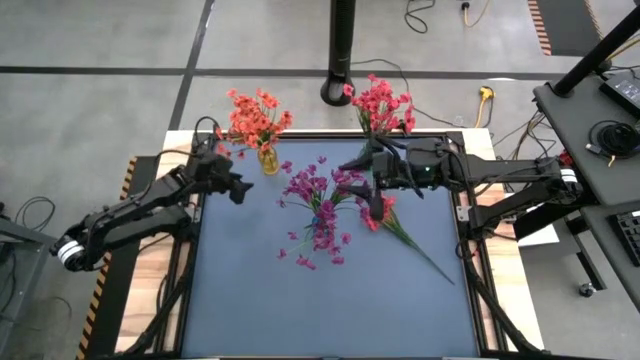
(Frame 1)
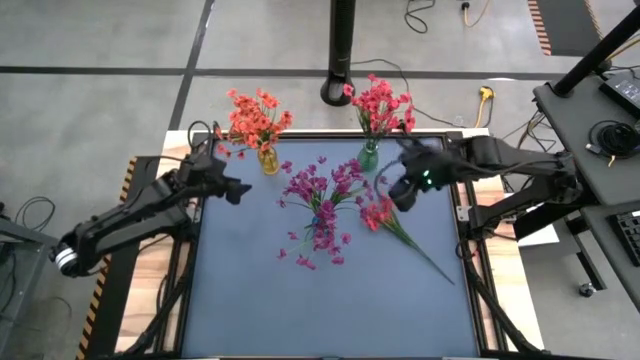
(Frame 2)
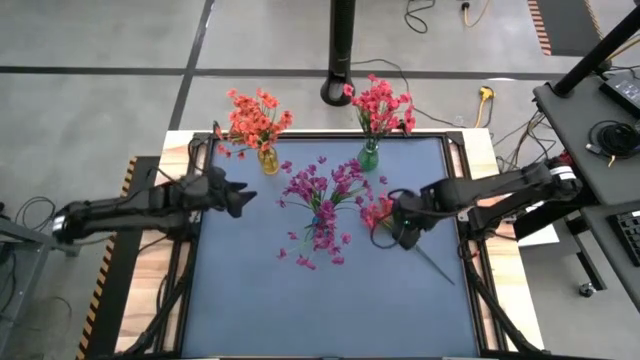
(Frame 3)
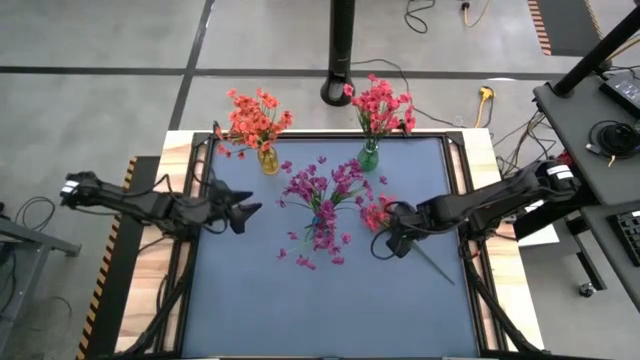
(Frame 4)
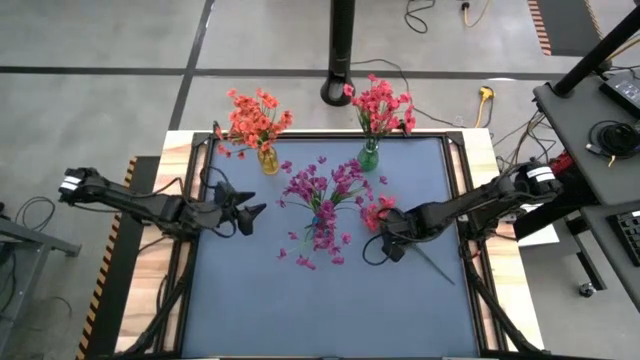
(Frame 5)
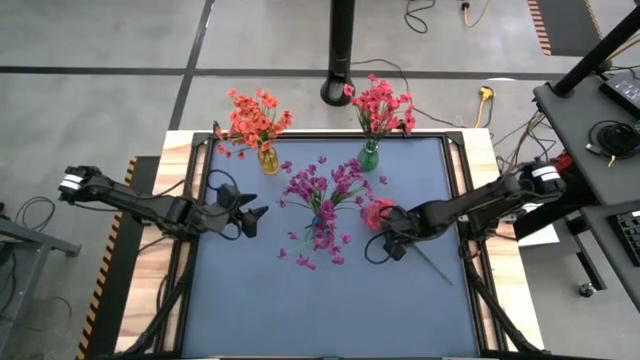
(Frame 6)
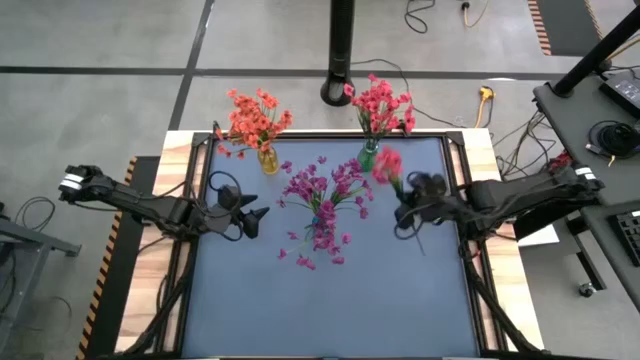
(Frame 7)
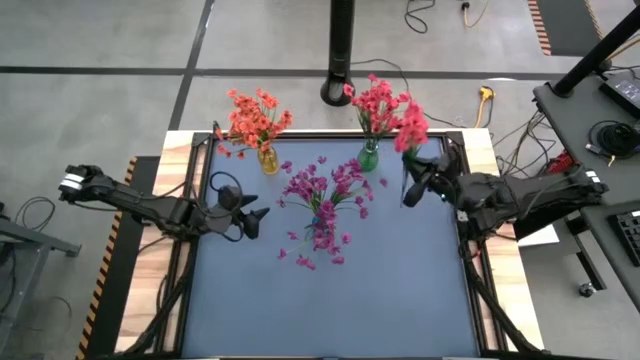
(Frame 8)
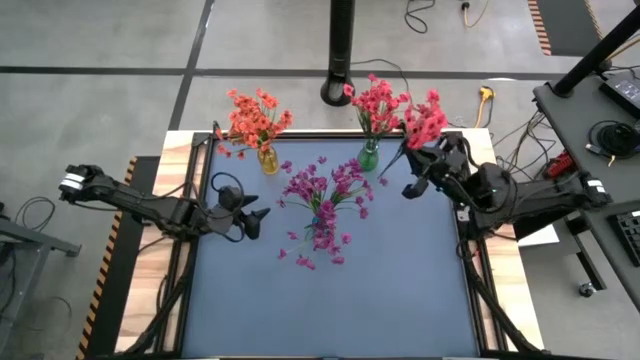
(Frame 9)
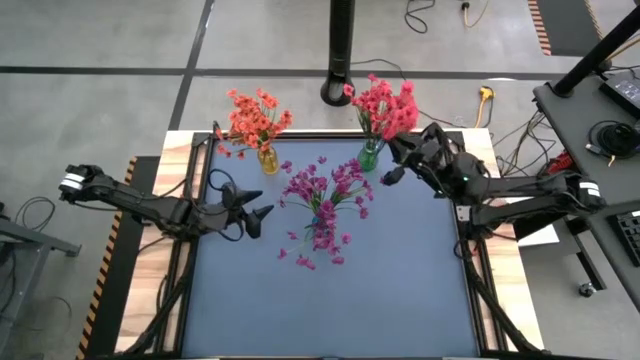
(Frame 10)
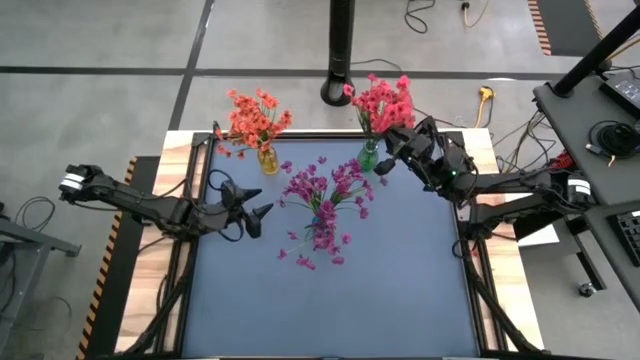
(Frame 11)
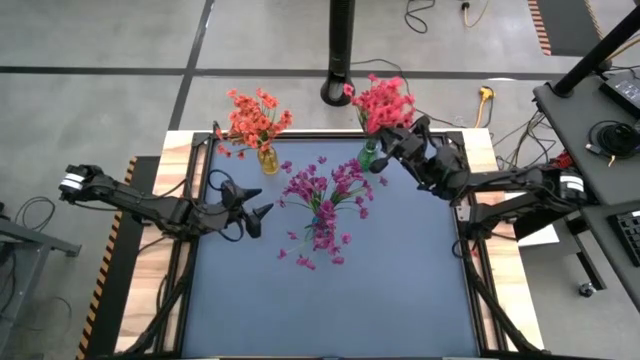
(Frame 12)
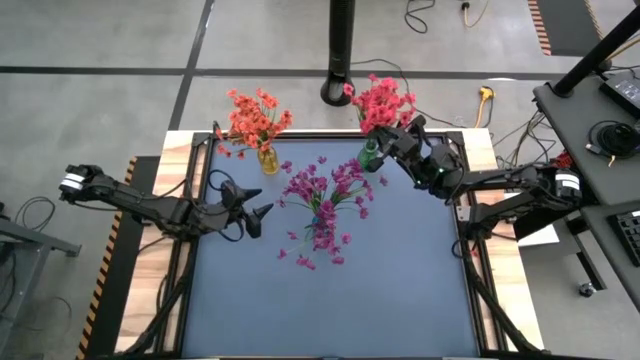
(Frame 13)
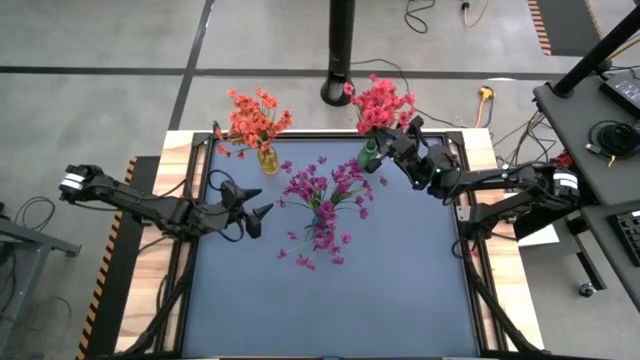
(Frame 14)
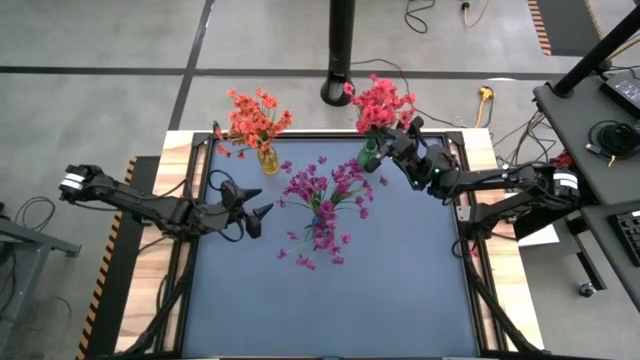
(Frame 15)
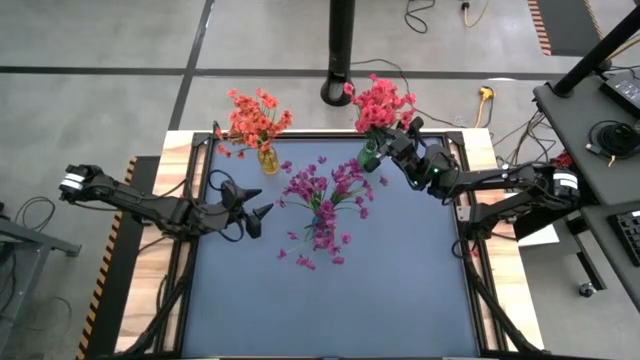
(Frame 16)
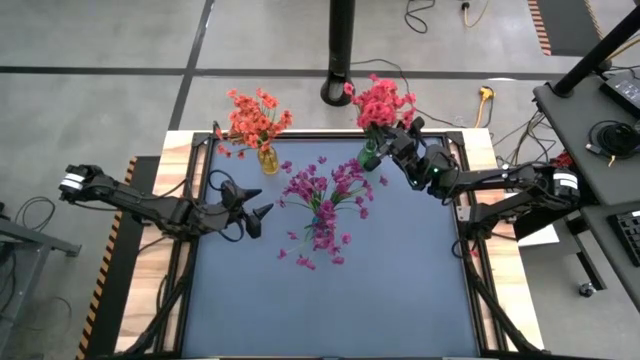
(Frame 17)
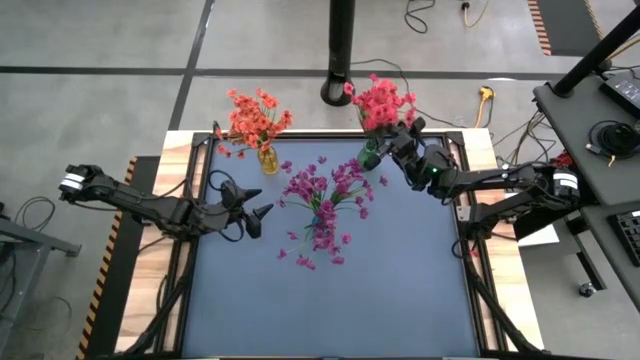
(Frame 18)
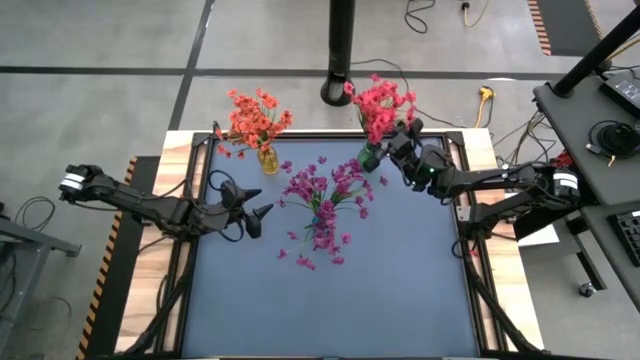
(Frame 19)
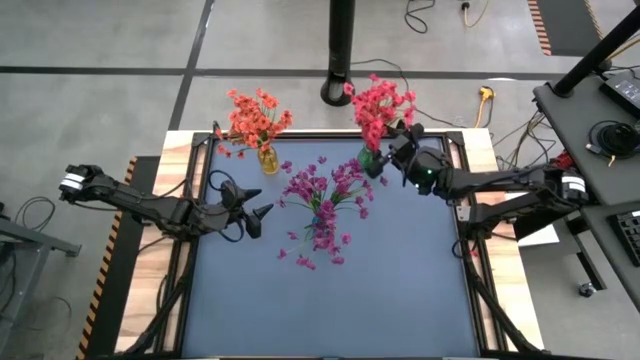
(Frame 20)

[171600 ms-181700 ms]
Task: Sort flowers into vase by color
Put the red flower into the green vase

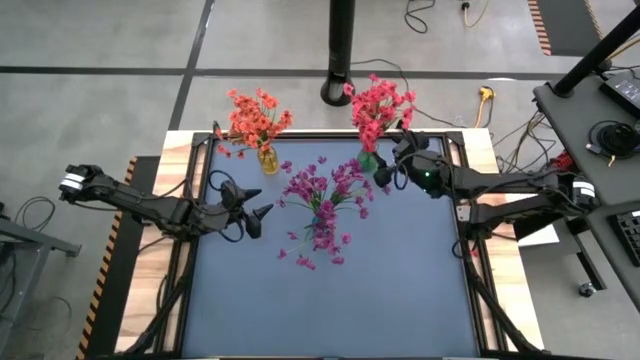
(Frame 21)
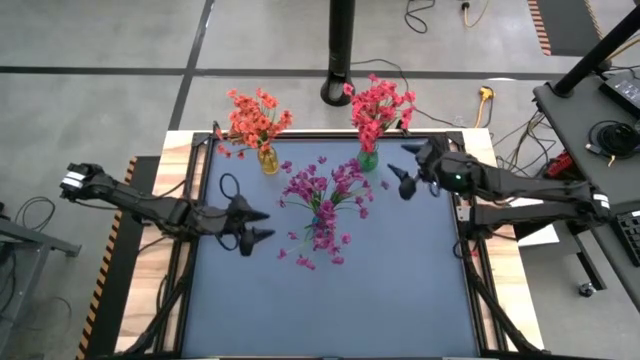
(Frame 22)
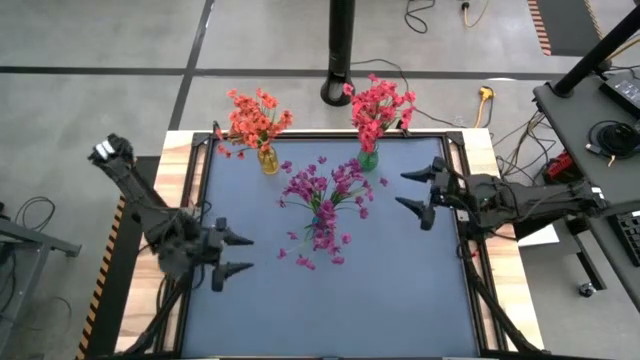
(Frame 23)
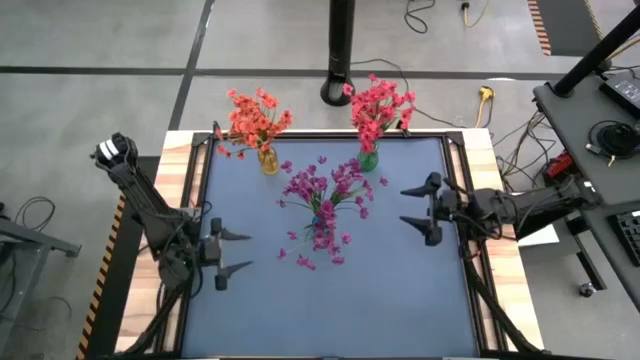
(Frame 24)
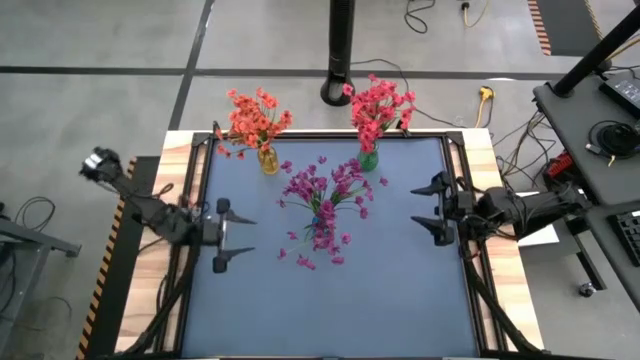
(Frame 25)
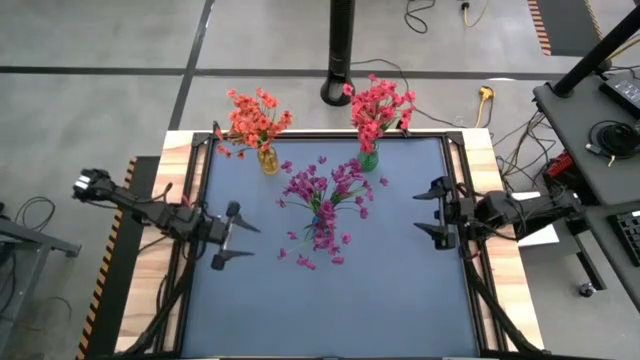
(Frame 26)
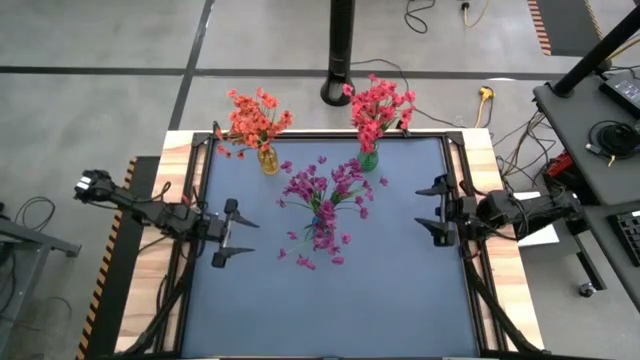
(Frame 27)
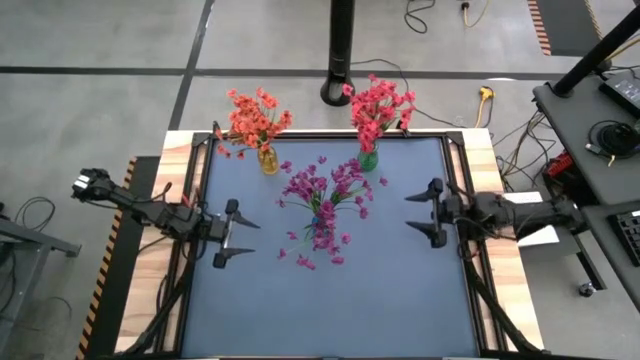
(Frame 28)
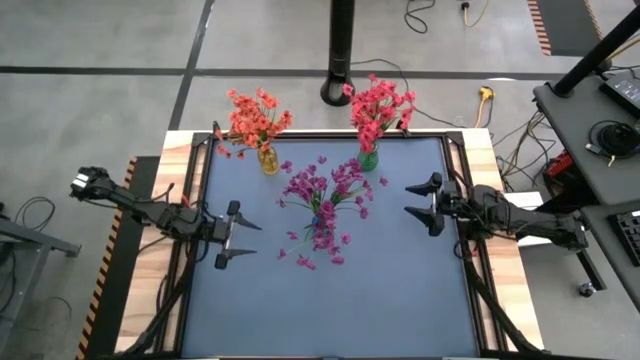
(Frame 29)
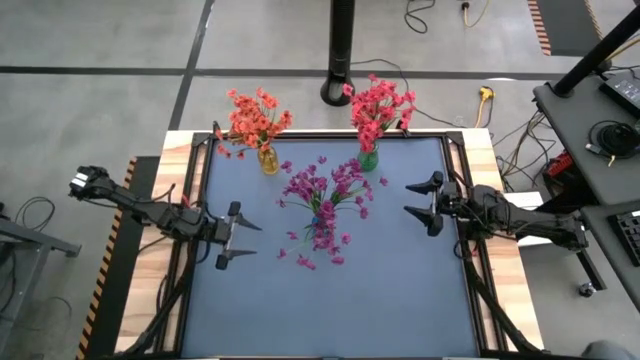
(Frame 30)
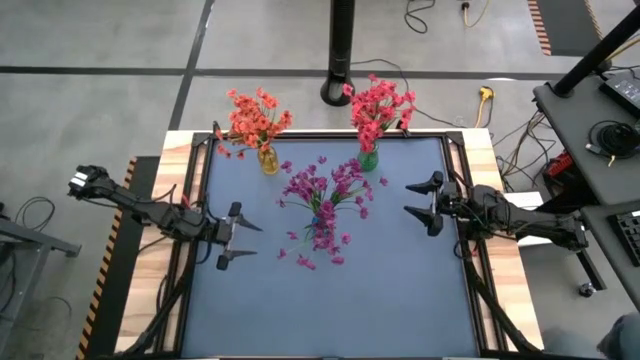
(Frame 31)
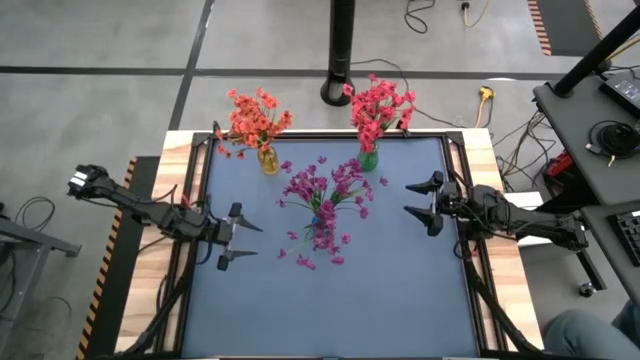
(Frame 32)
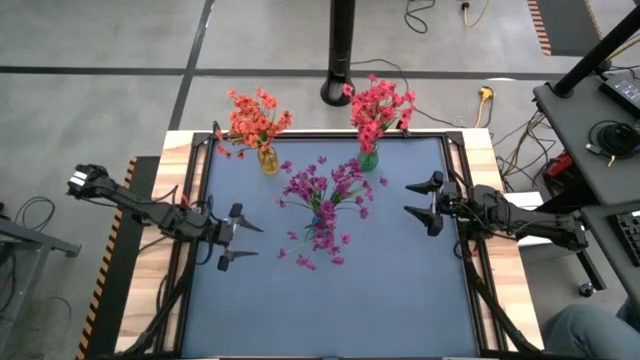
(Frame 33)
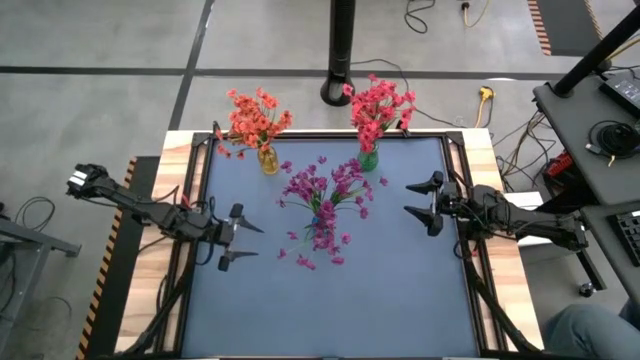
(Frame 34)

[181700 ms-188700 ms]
Return to Home Position

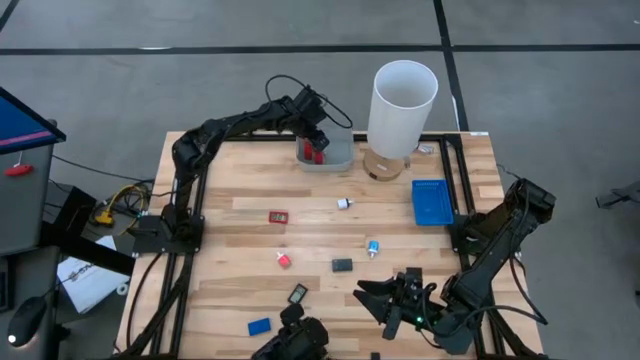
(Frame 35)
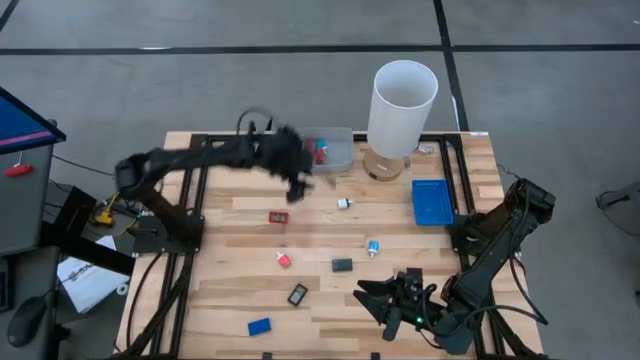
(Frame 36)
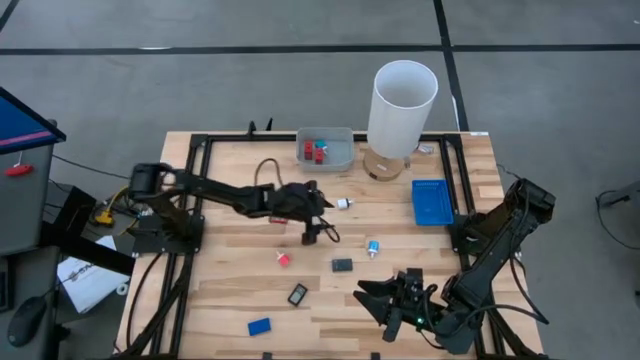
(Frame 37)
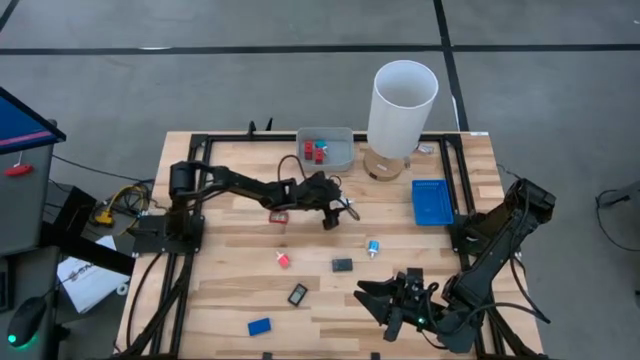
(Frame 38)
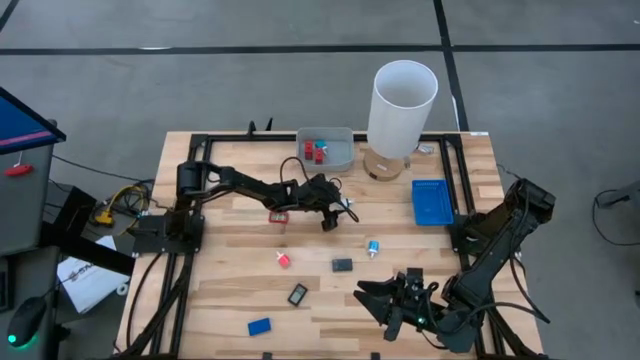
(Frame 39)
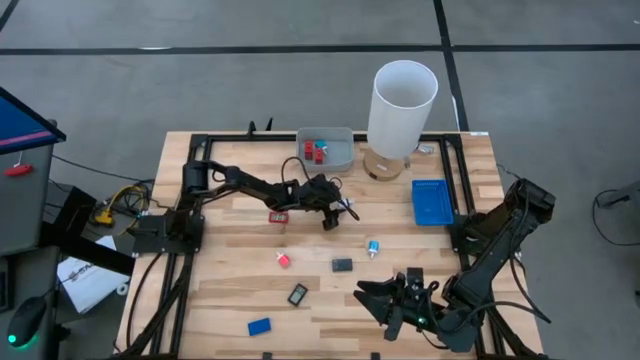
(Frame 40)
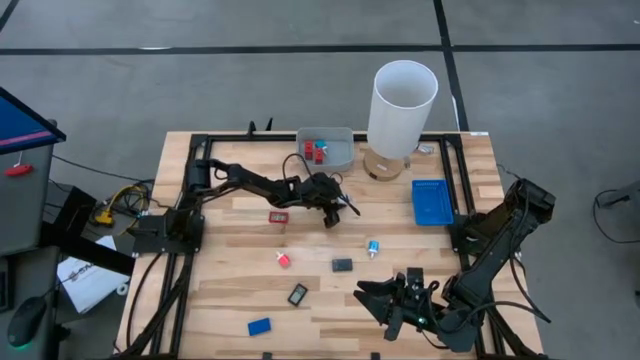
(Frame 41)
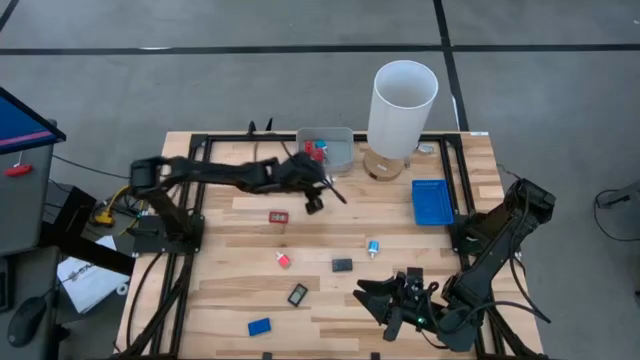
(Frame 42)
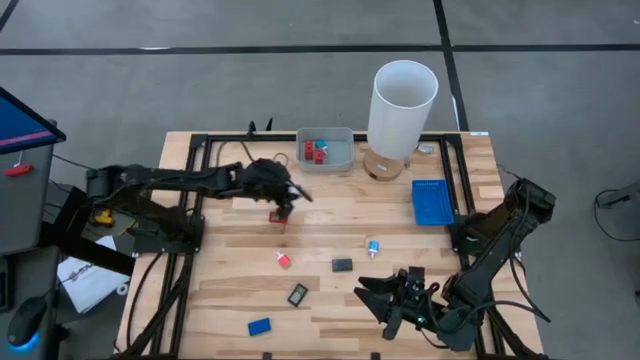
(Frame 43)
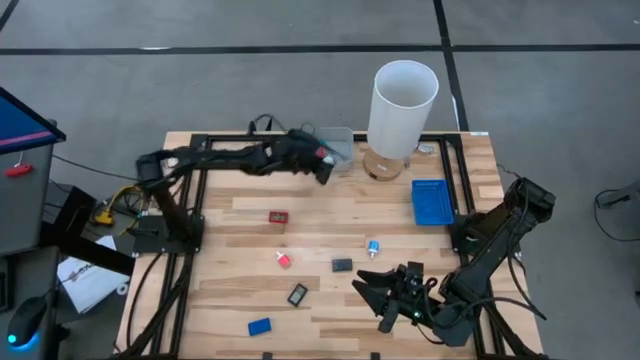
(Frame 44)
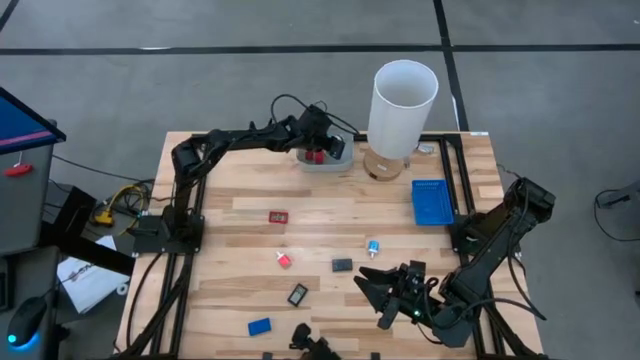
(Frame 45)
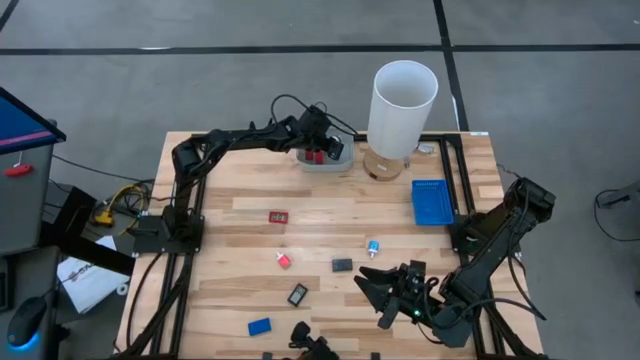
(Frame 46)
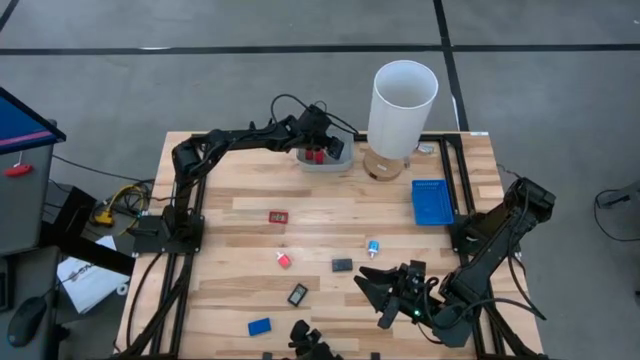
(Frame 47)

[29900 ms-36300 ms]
Task: Pick & Place Office items
Put the white charger adapter into the gray bin
